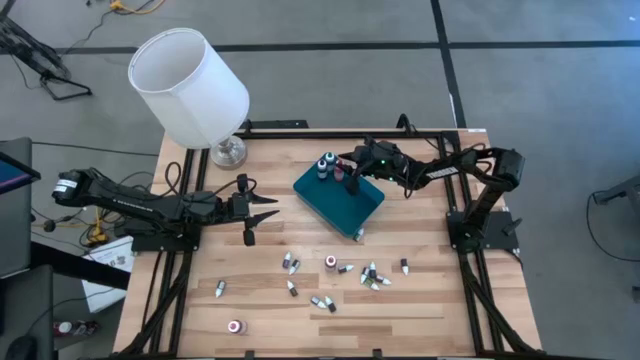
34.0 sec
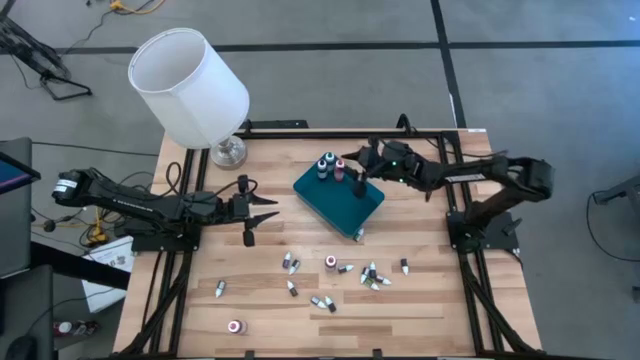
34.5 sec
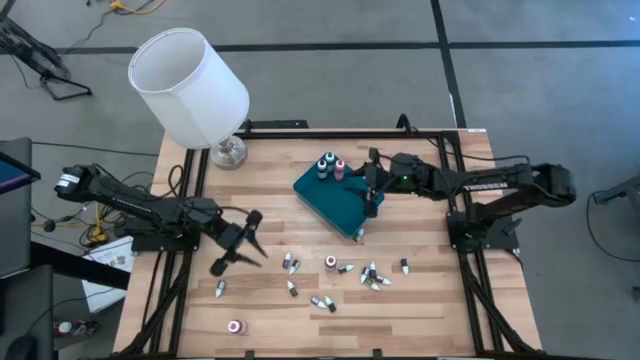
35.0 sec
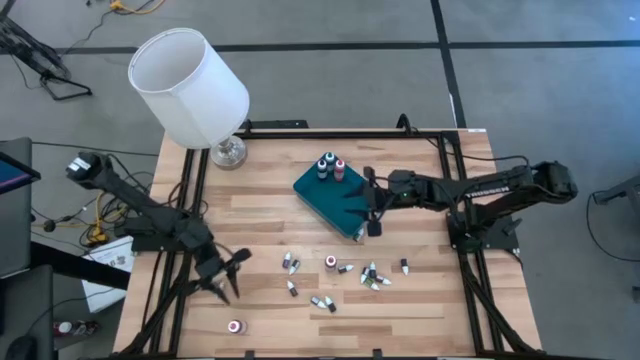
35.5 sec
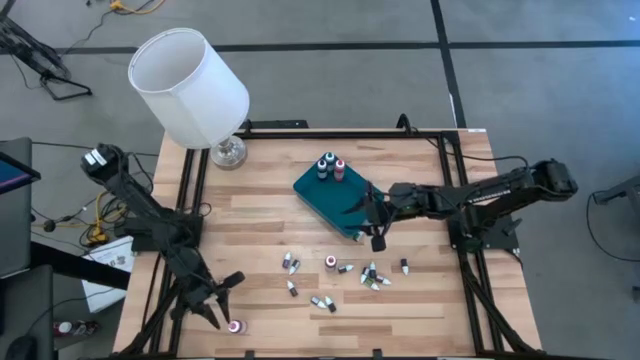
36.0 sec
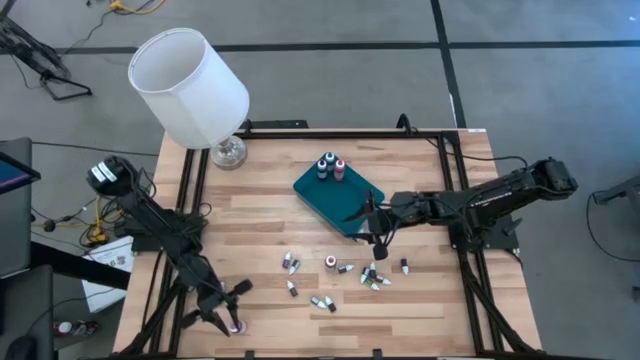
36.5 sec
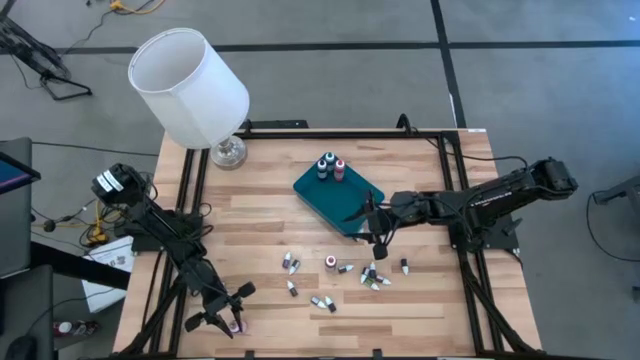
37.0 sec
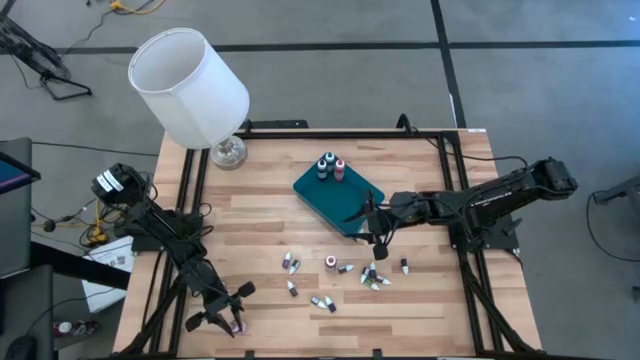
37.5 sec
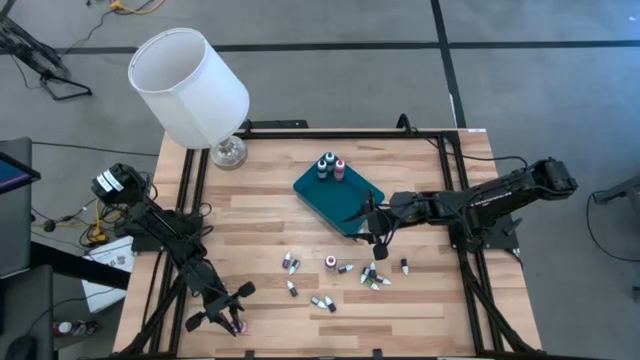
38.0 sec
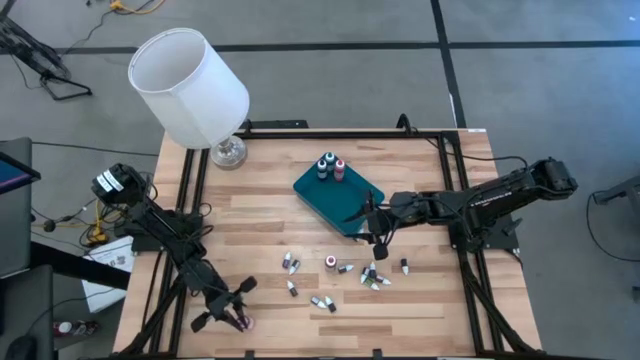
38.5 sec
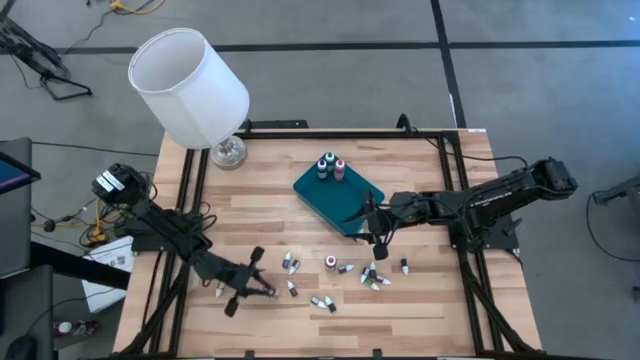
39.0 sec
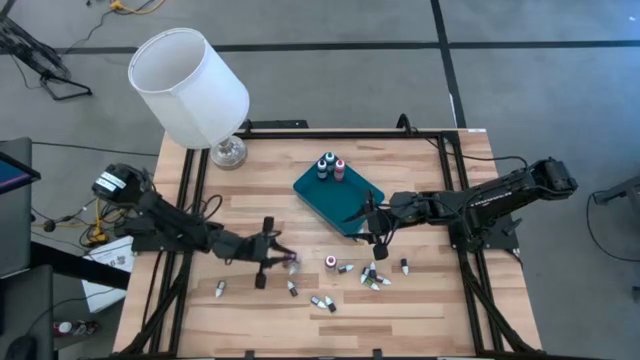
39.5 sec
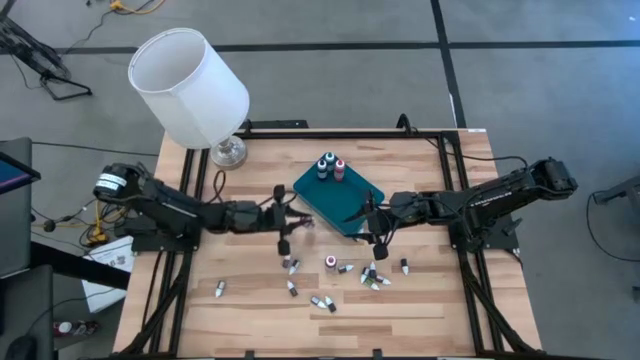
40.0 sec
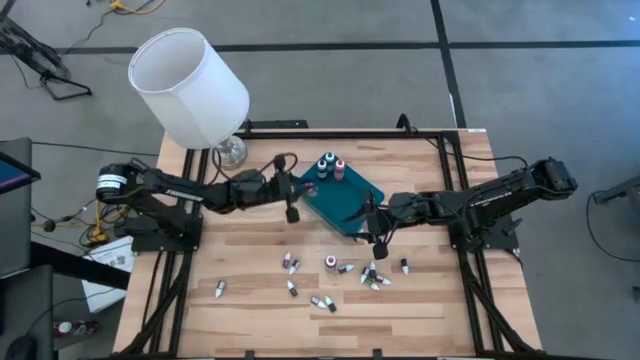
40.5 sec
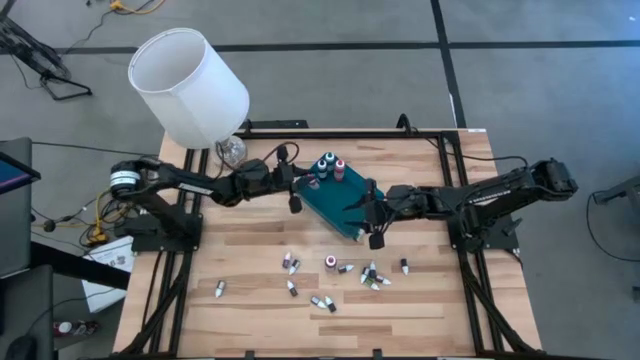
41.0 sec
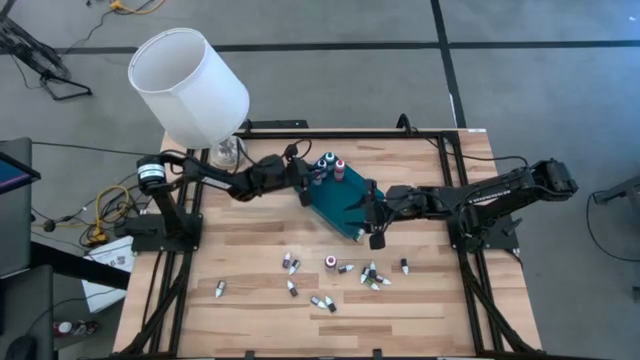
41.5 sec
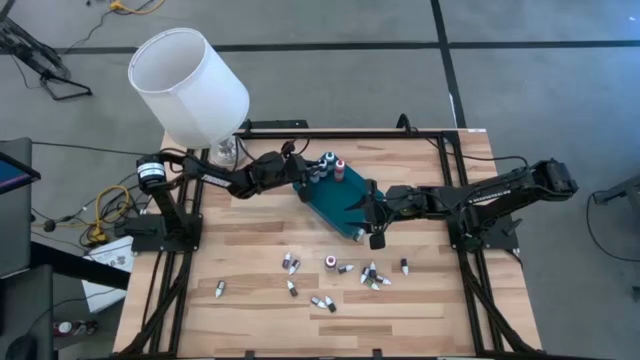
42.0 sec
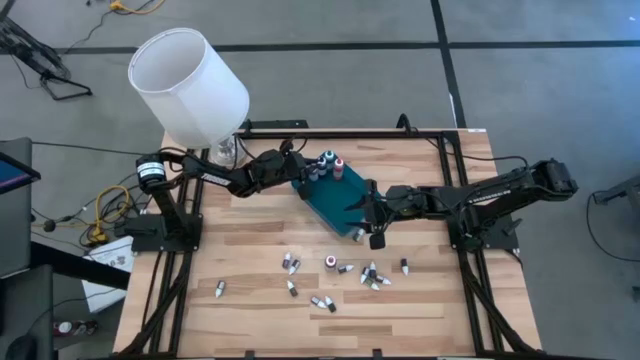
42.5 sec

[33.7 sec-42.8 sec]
Task: Pick & Place food coloring
Put the large pink food coloring bottle into the blue bin

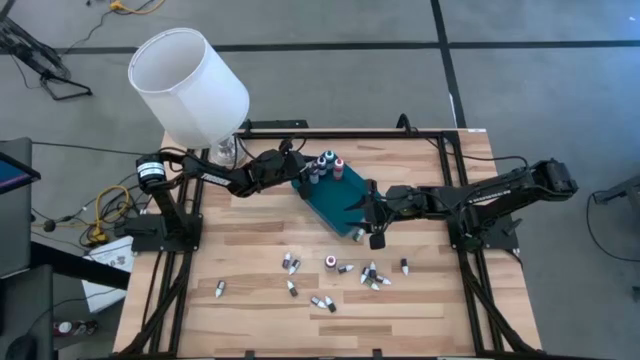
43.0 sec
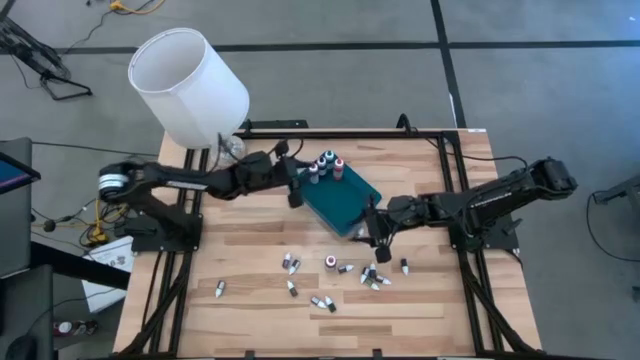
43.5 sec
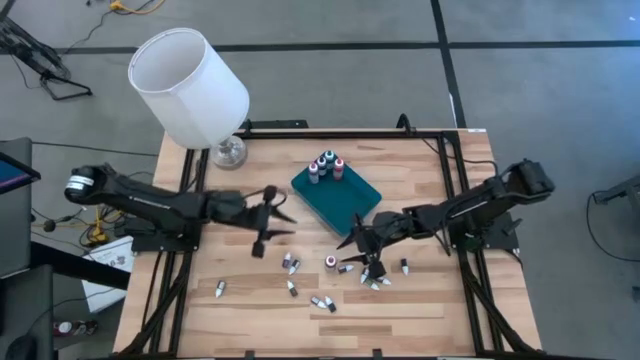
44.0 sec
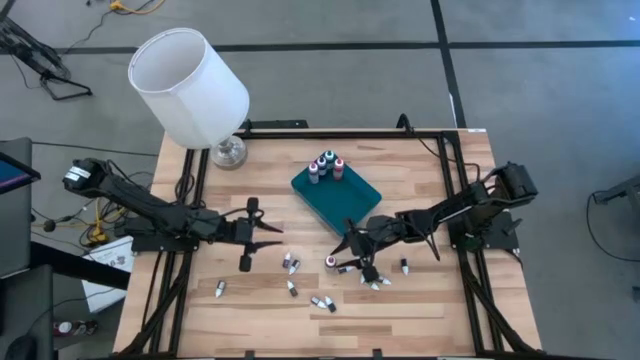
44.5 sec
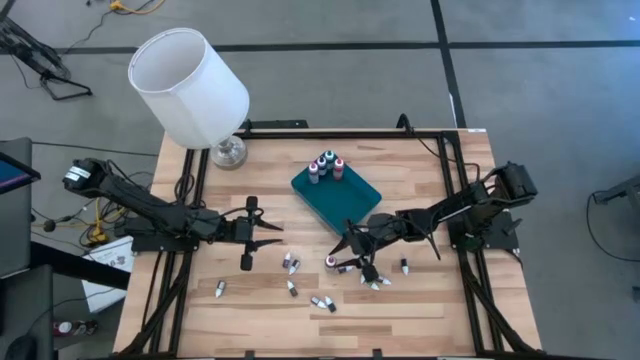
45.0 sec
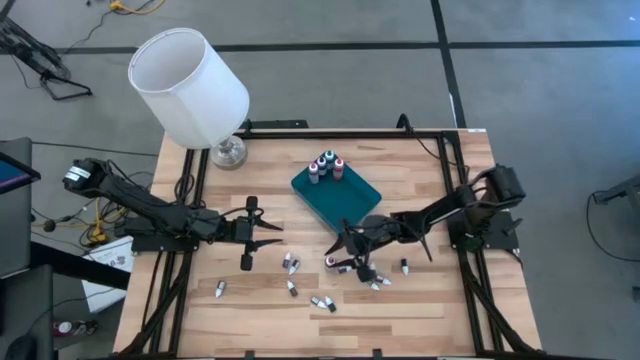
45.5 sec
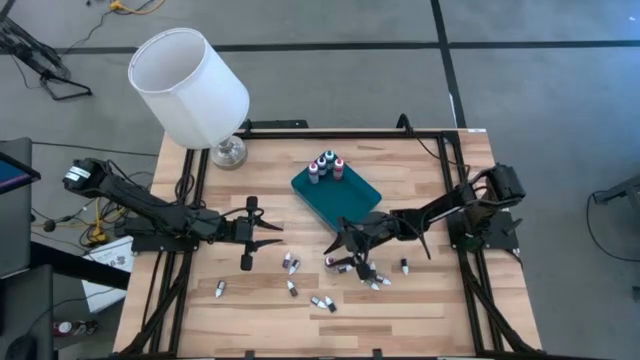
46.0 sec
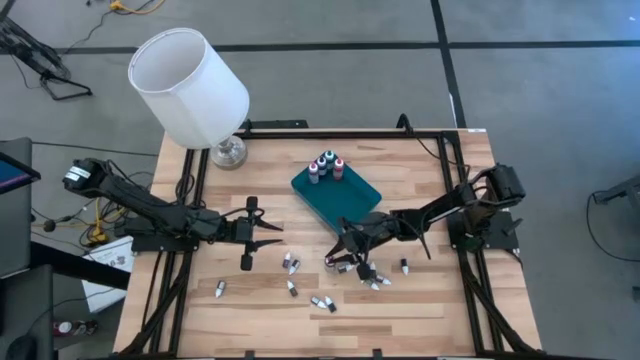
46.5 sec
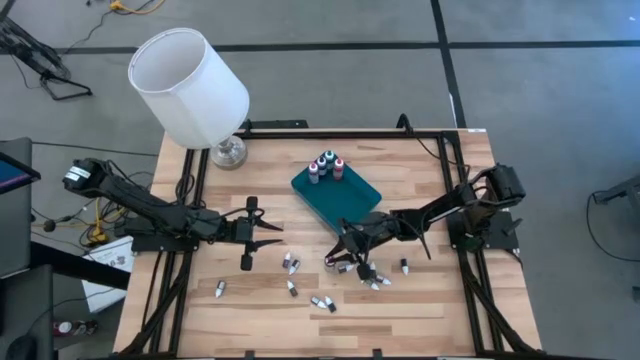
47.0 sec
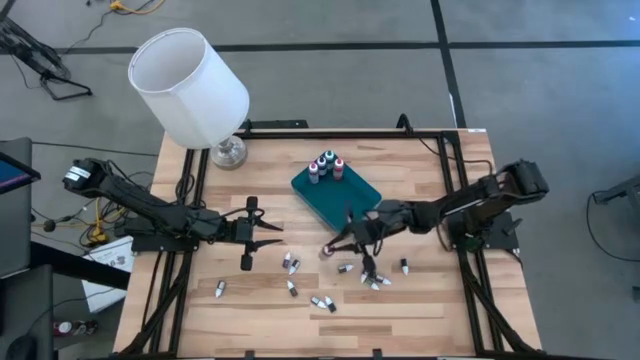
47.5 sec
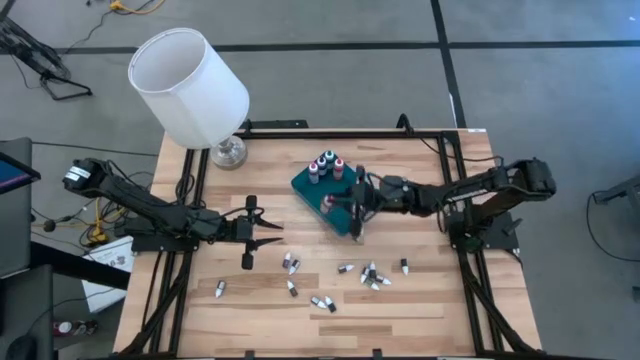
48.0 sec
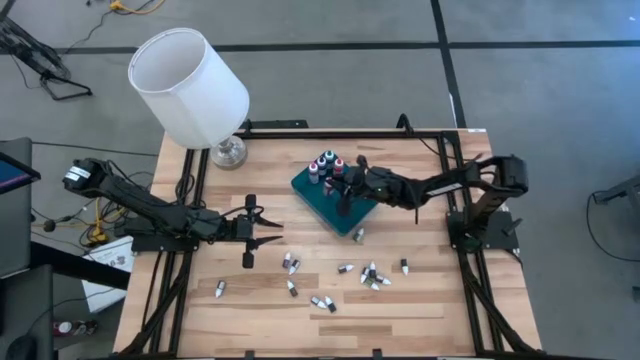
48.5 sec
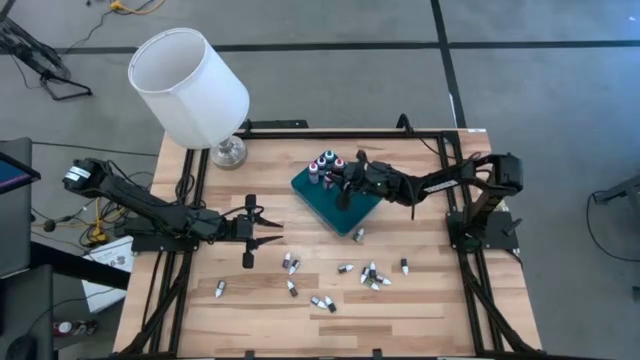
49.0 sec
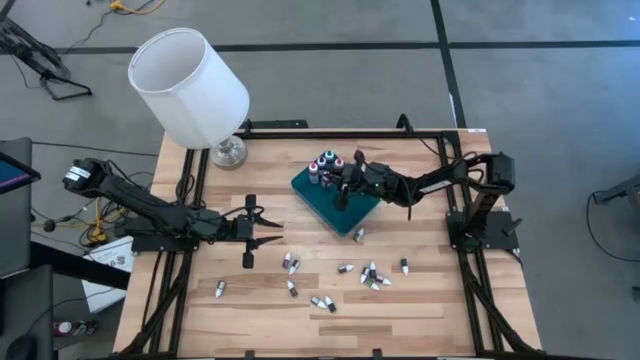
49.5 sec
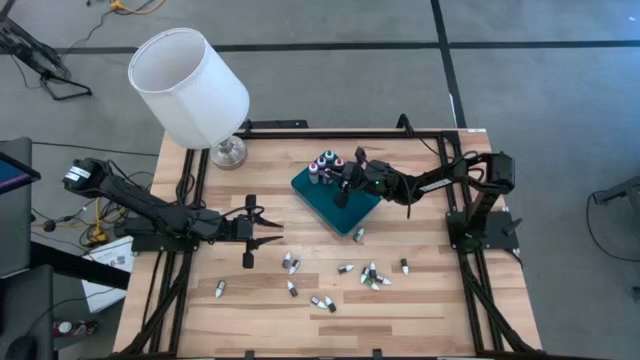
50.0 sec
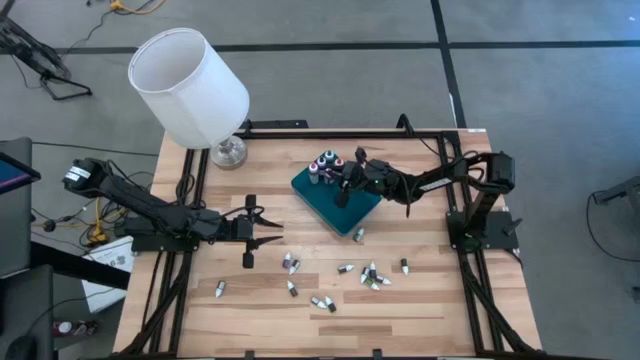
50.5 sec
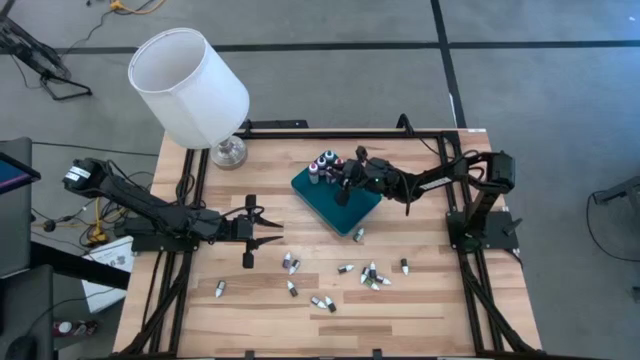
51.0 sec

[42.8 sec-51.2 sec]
Put the large red food coloring bottle into the blue bin

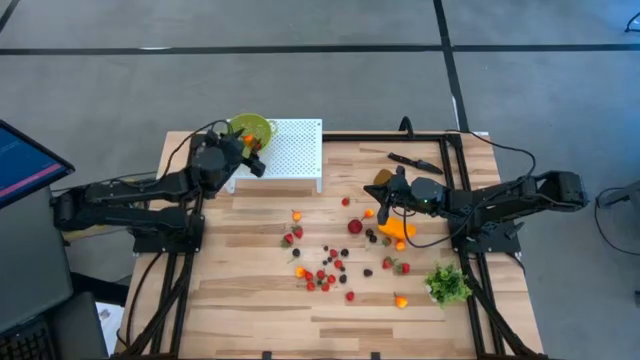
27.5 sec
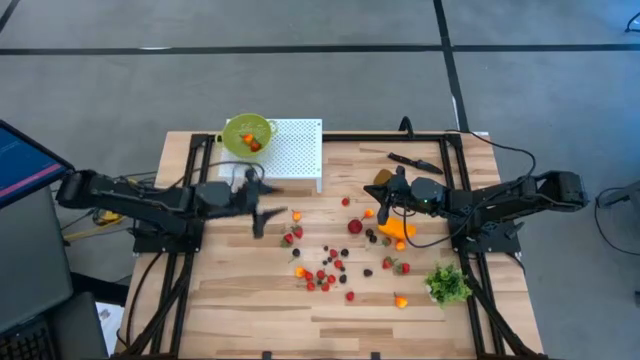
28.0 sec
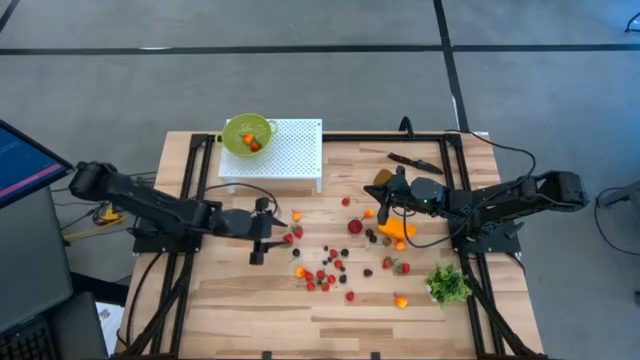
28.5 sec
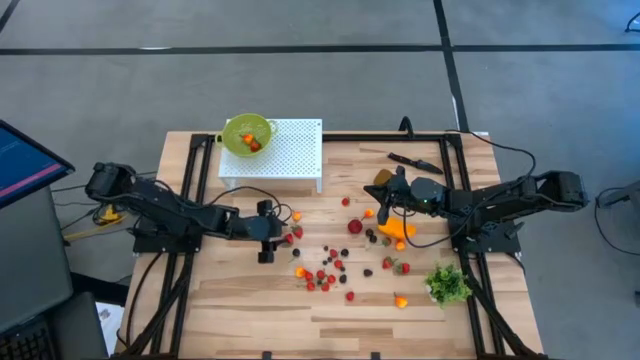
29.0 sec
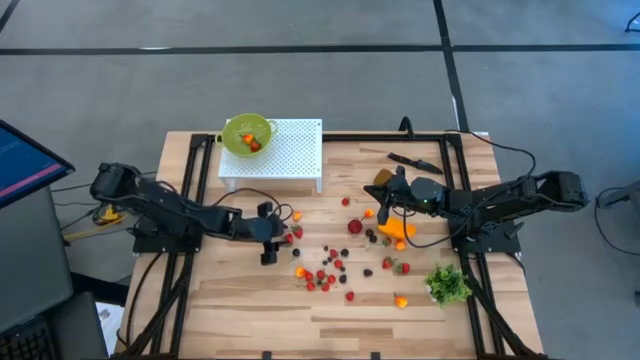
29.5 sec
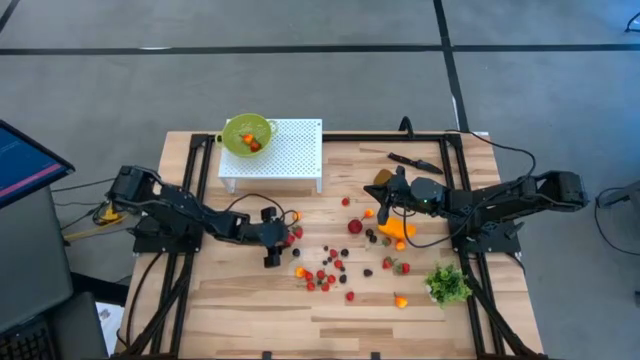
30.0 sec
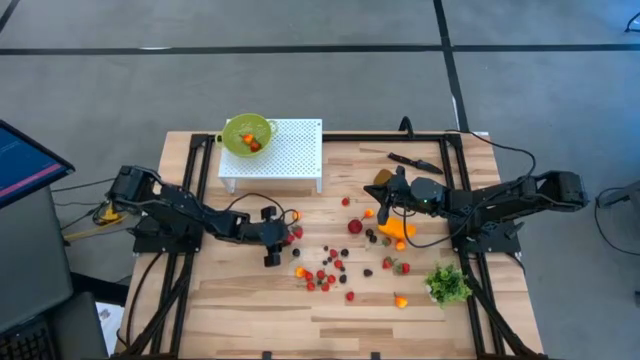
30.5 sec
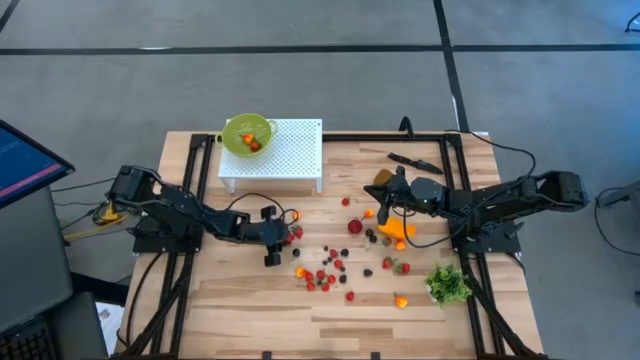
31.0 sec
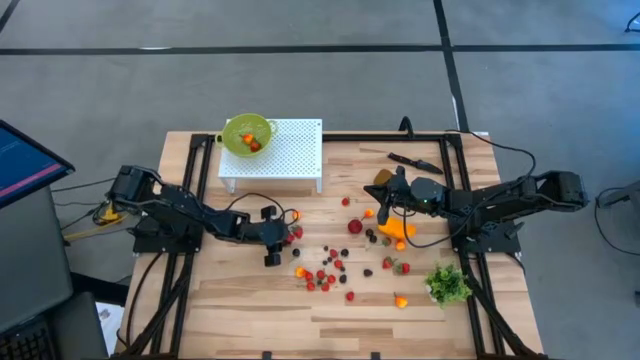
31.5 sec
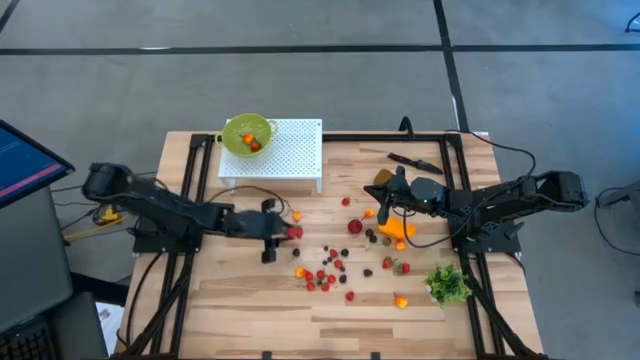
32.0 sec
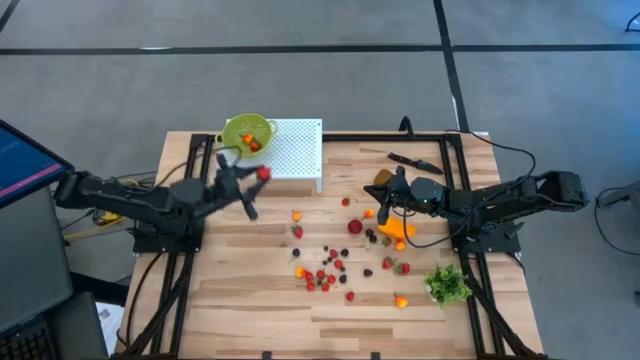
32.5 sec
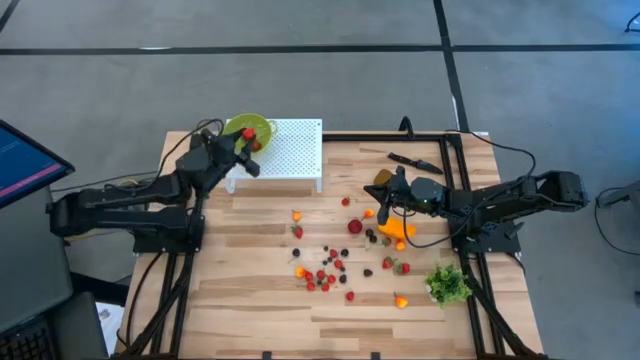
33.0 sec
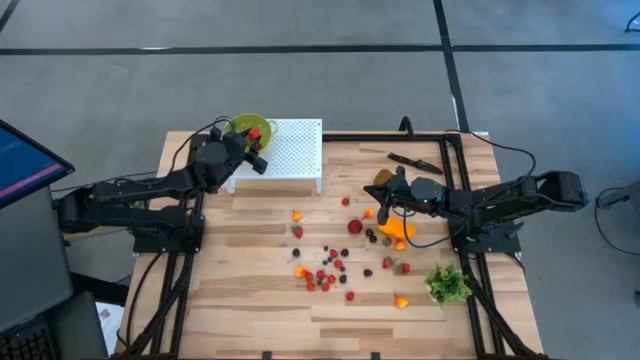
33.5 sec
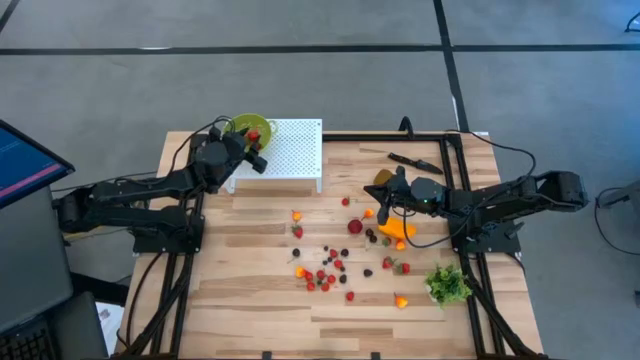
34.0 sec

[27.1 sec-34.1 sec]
Task: Pick & Place Fruit
Put the strawberry into the green strainer bowl on the shelf
